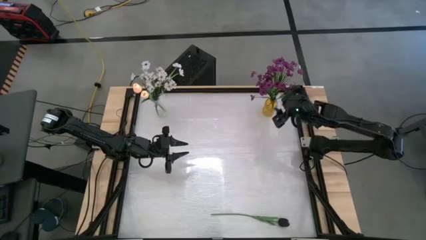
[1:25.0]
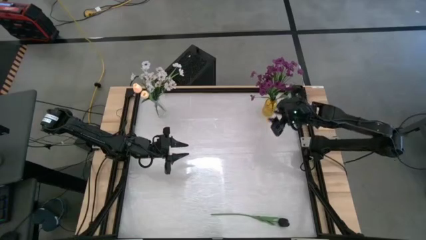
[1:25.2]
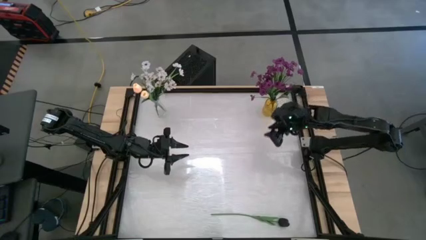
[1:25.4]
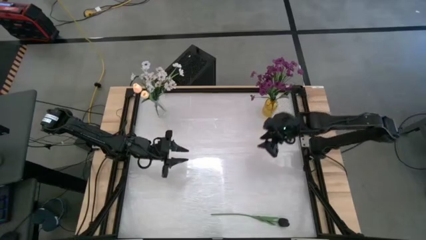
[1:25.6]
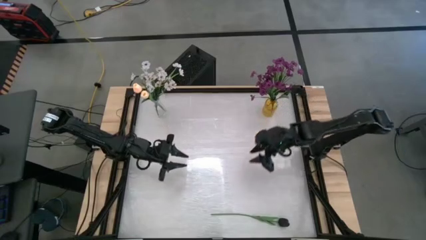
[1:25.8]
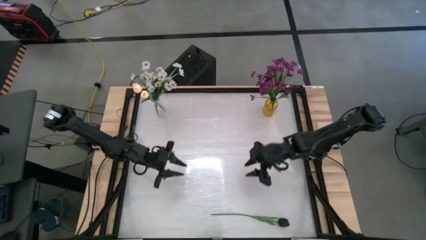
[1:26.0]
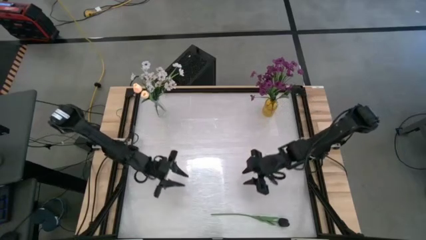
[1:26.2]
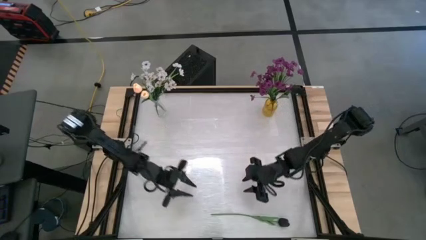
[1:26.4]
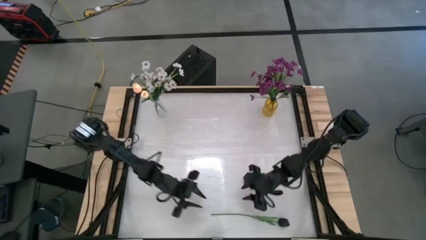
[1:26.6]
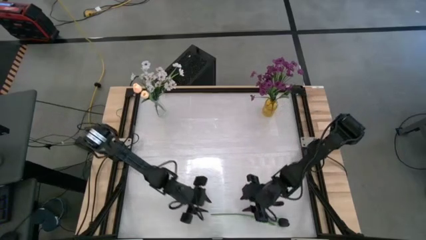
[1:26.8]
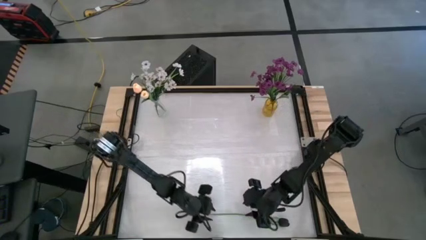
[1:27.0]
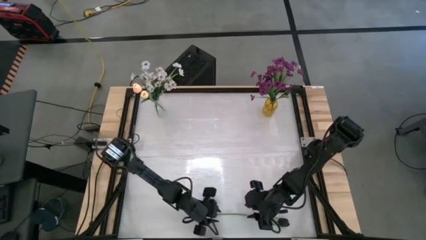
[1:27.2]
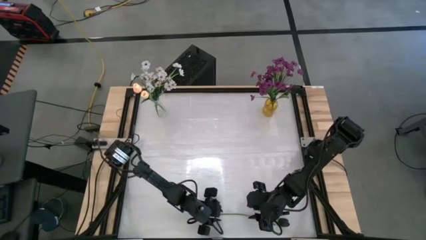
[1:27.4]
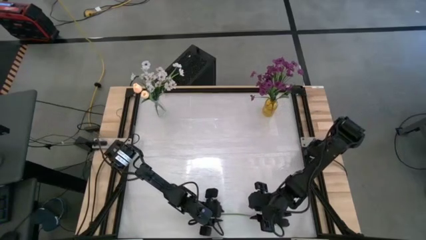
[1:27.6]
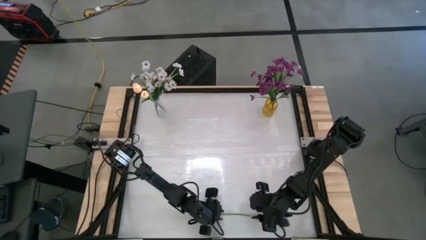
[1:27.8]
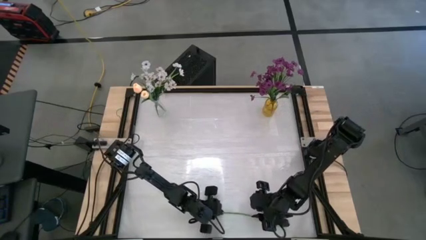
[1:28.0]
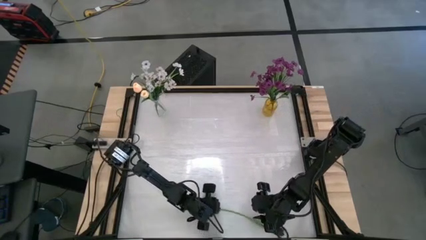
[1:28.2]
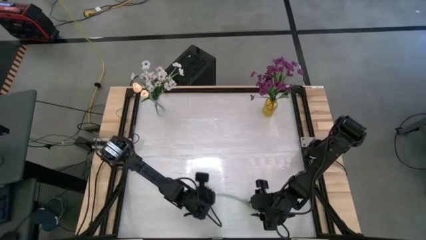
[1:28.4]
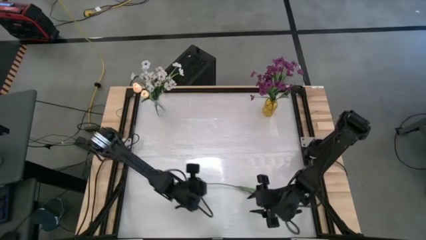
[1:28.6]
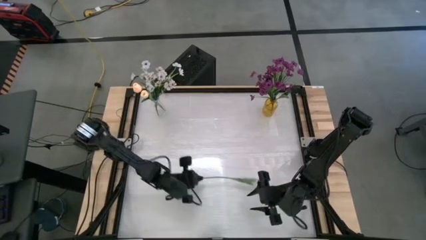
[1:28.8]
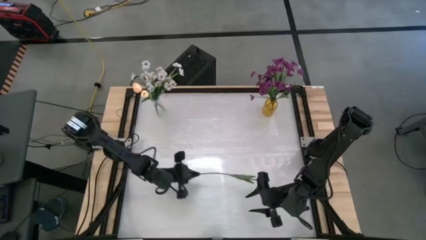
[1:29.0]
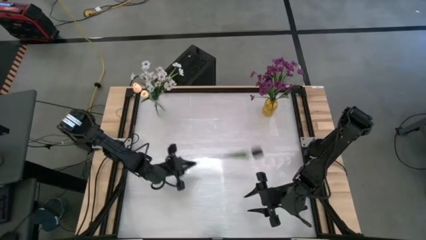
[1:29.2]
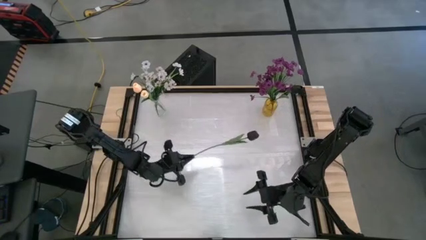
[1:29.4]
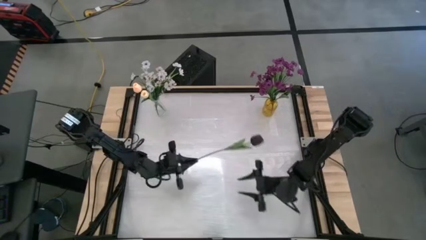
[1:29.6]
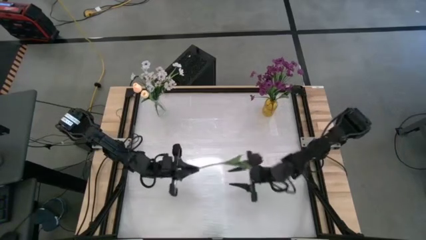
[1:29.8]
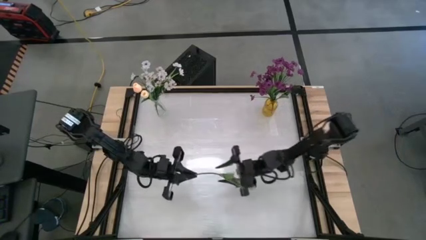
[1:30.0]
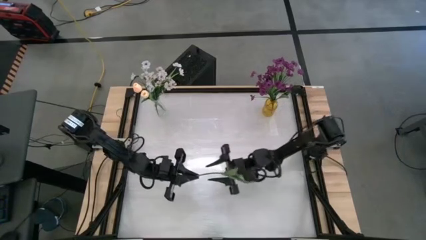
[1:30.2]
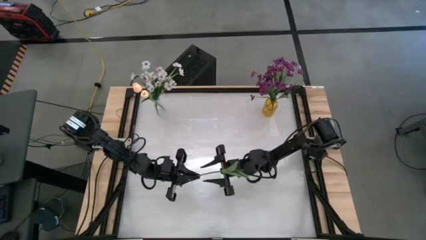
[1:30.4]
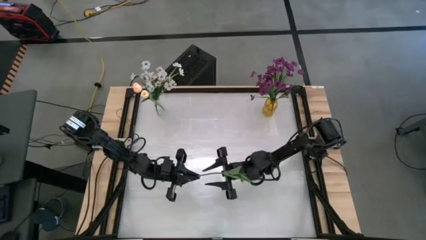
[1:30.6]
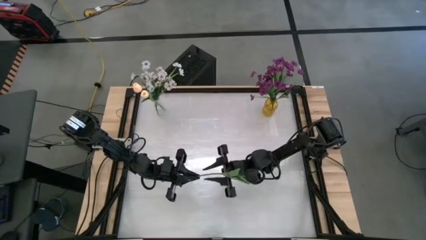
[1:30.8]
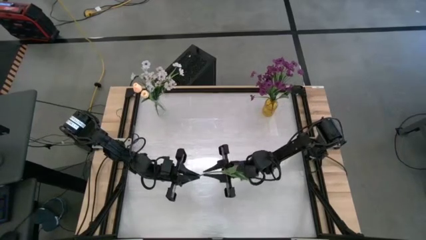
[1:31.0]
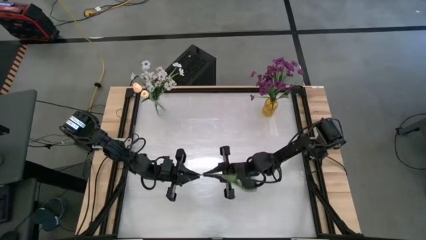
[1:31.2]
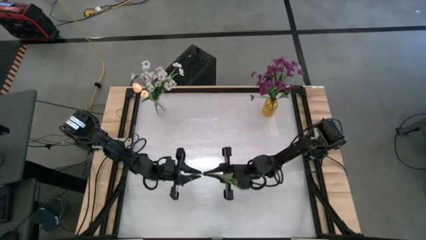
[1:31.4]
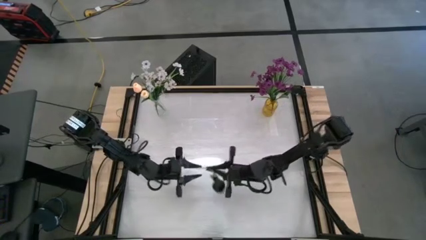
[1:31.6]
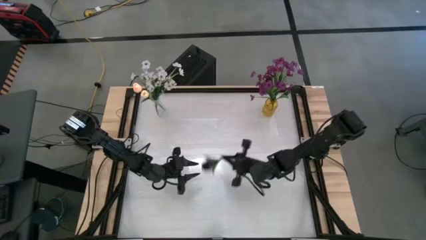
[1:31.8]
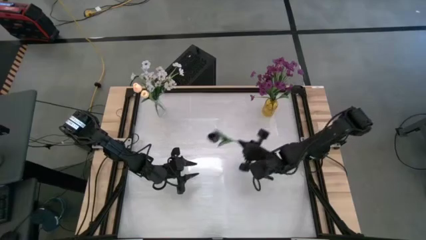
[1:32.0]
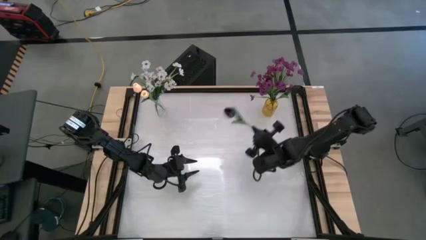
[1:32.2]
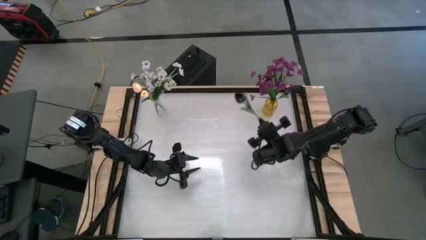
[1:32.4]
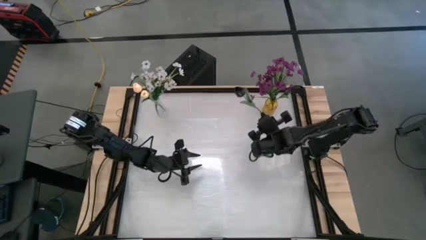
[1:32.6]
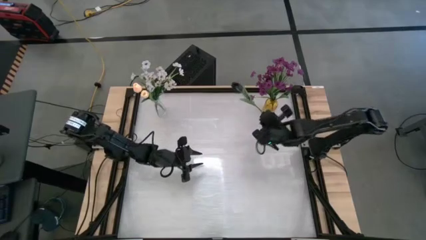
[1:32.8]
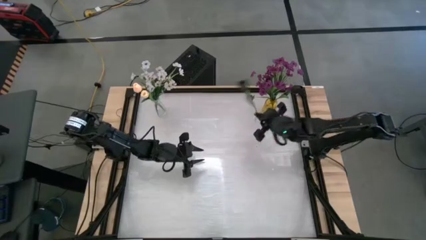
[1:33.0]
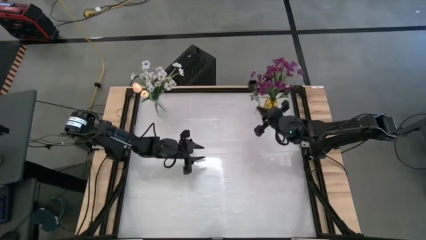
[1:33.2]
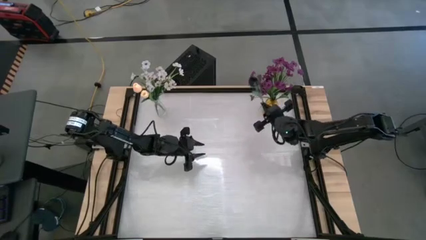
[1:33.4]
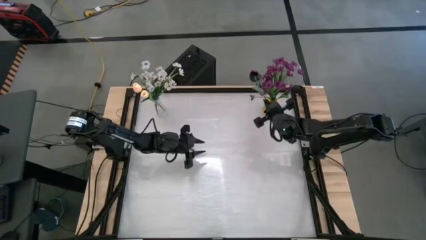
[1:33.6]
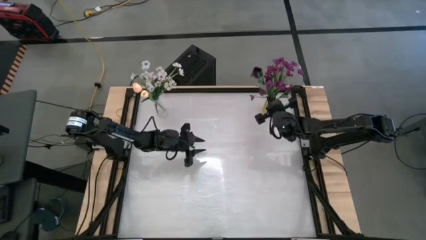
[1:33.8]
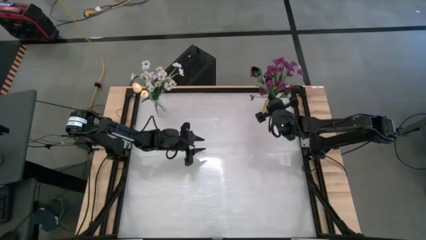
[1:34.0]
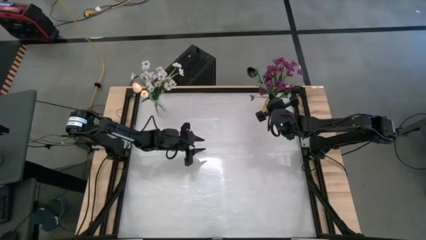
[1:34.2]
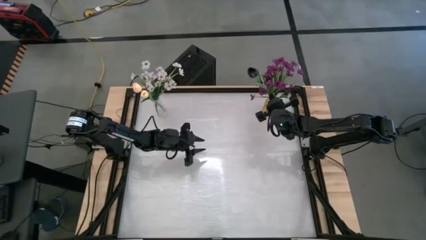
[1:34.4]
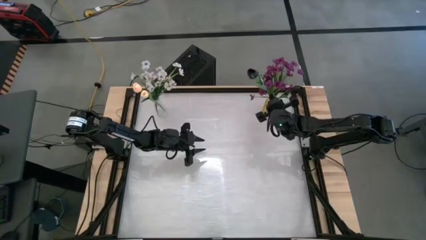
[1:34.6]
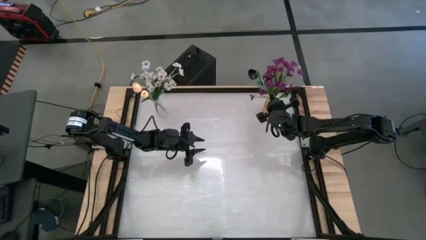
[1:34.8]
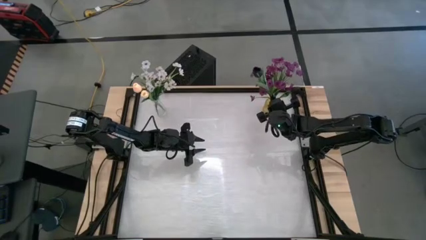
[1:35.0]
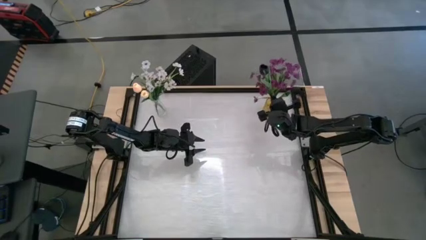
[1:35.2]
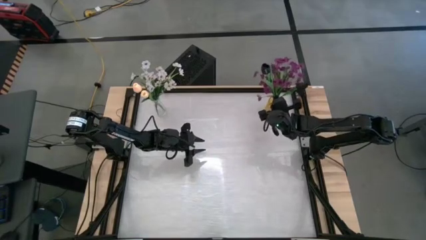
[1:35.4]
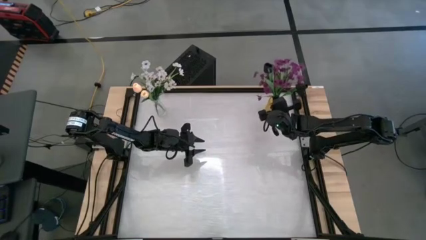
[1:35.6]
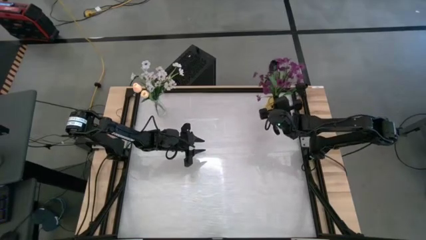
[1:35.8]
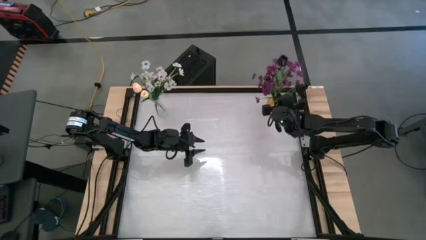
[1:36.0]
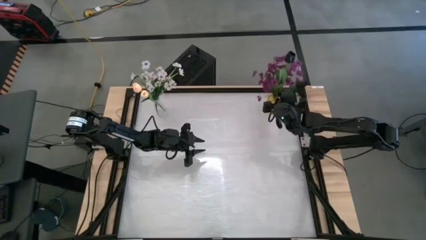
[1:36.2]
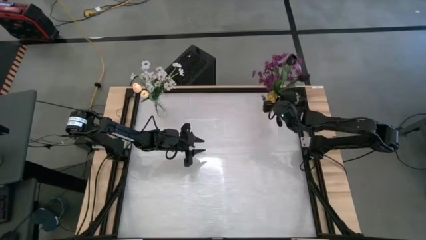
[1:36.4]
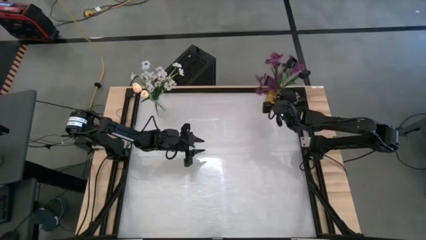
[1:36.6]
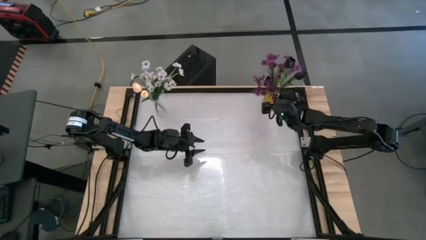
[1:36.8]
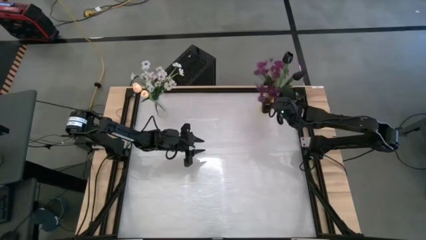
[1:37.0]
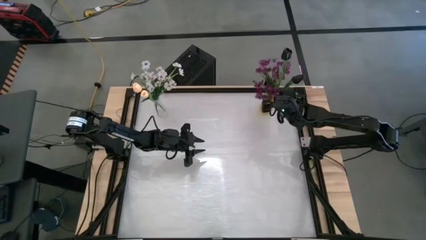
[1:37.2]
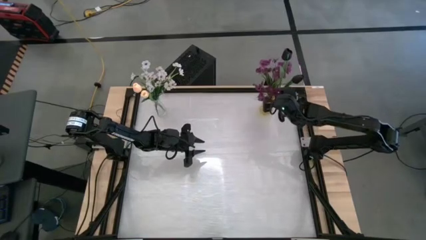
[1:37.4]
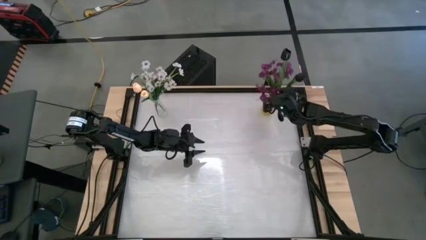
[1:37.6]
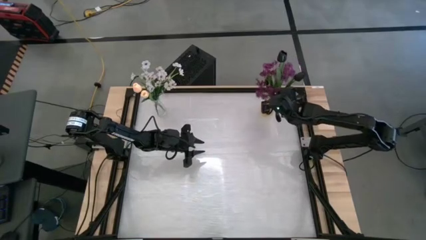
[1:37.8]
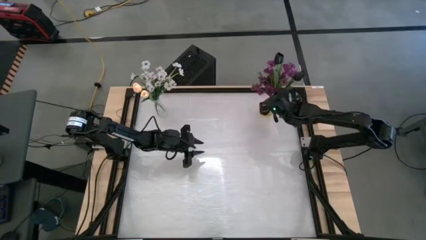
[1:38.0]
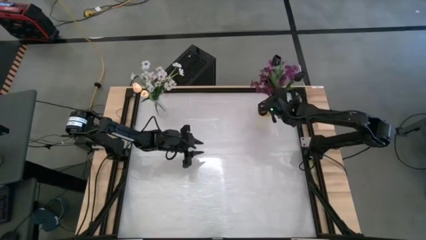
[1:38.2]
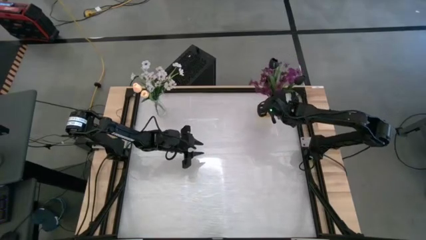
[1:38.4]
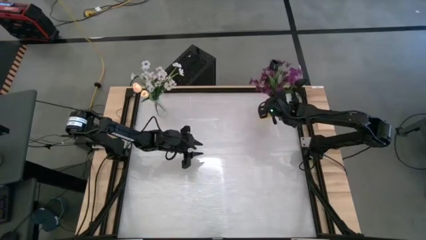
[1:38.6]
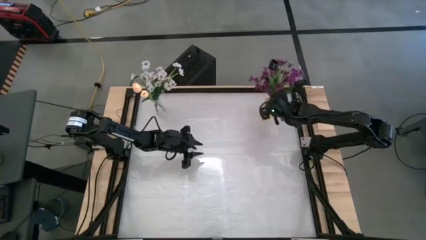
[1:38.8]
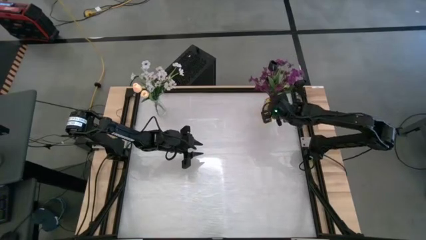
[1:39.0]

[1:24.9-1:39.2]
Task: Sort flowers into vase by color
Put the black tulip into the yellow vase
